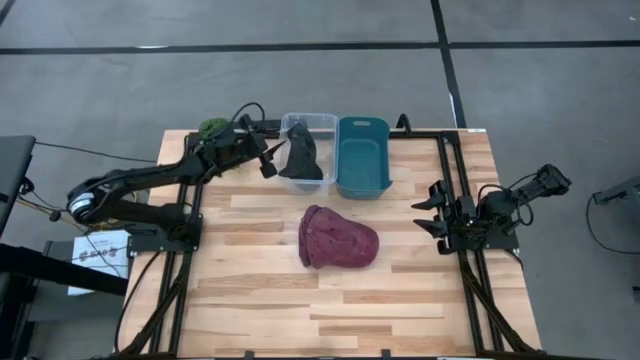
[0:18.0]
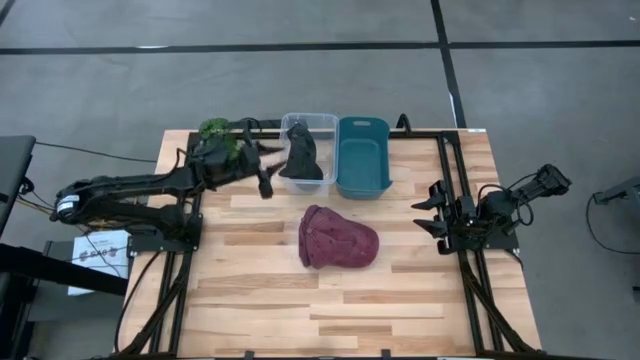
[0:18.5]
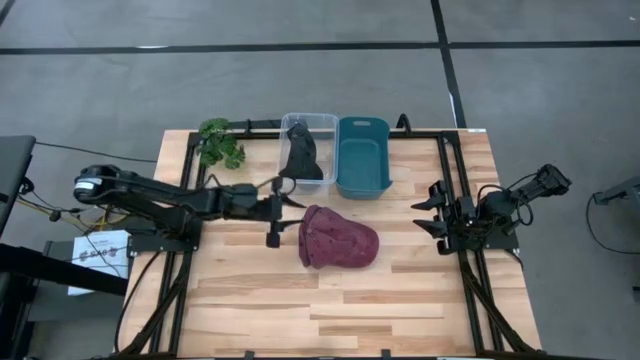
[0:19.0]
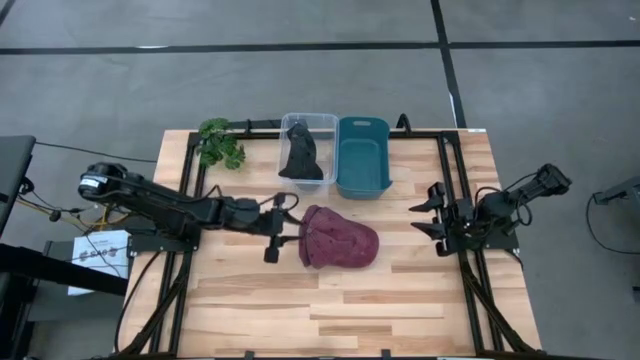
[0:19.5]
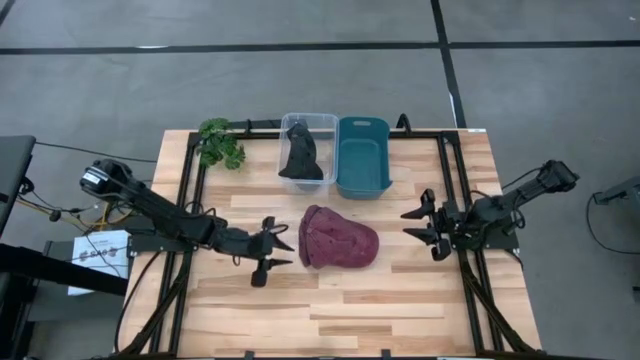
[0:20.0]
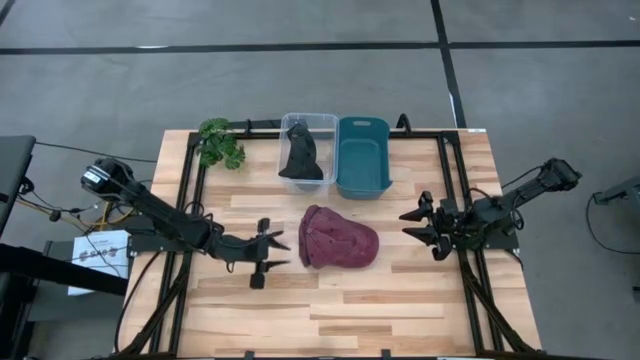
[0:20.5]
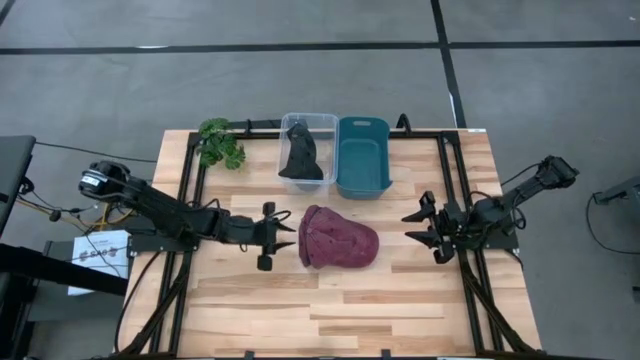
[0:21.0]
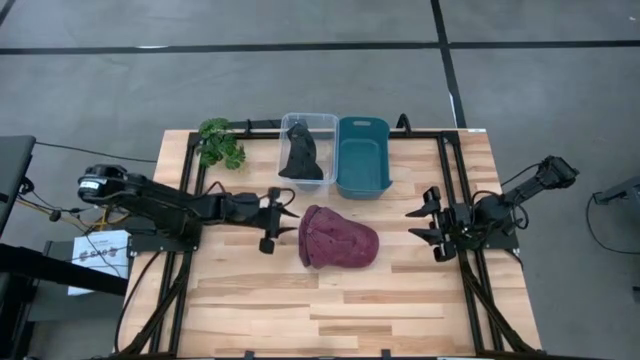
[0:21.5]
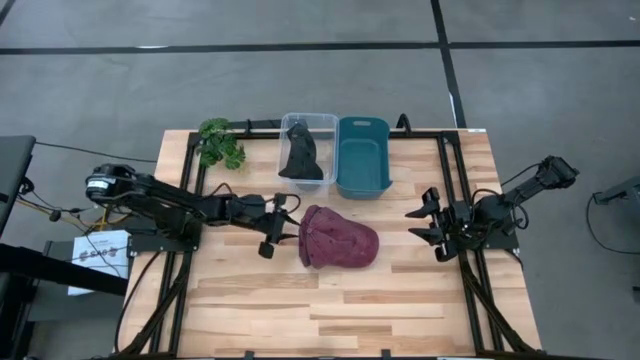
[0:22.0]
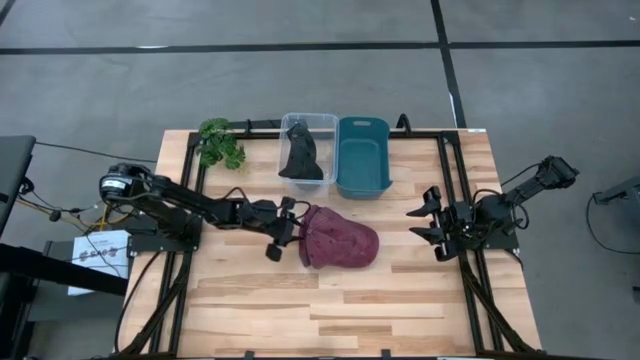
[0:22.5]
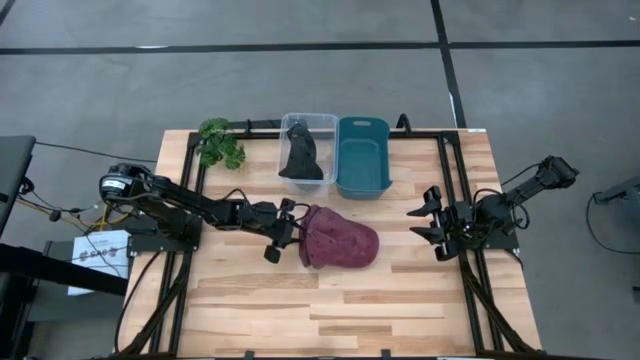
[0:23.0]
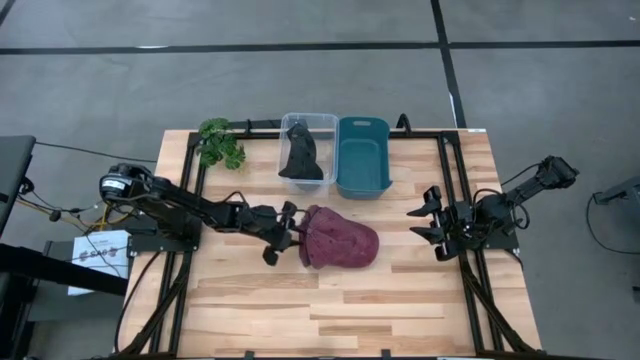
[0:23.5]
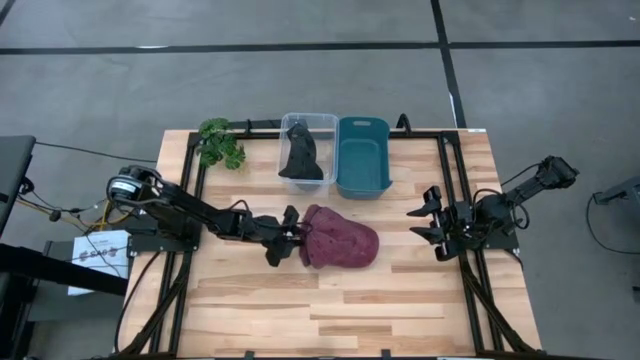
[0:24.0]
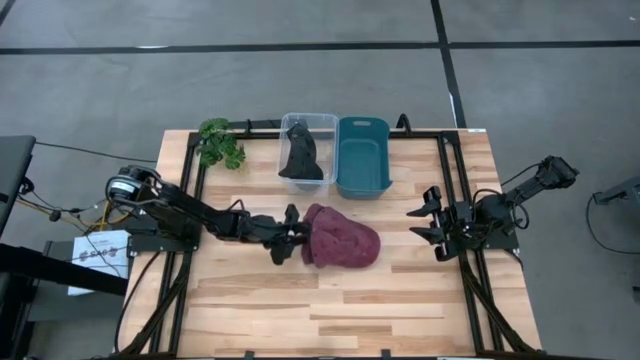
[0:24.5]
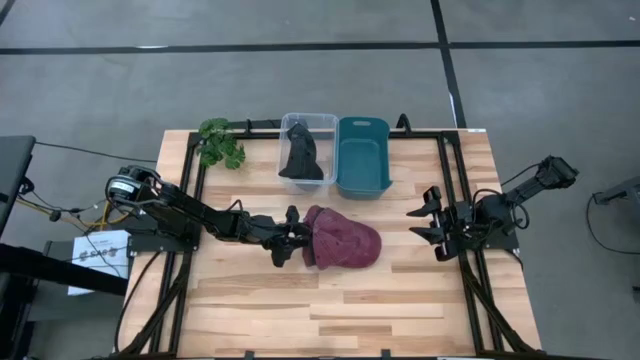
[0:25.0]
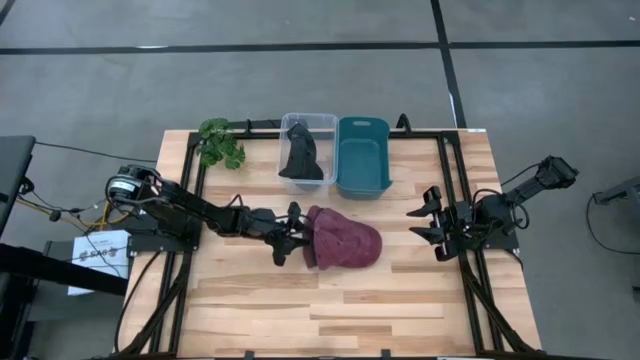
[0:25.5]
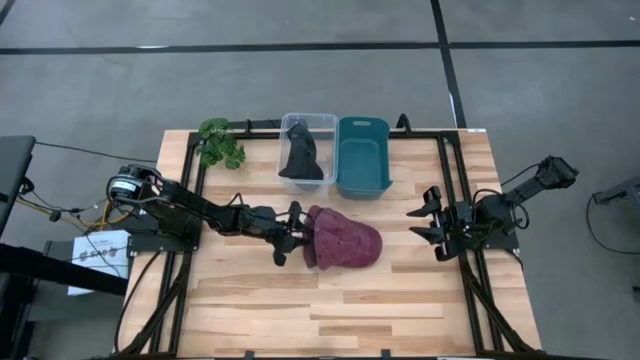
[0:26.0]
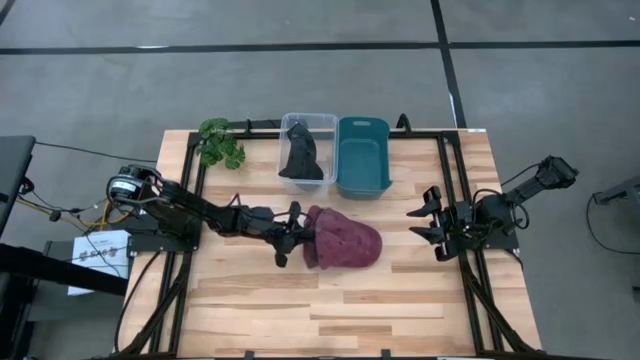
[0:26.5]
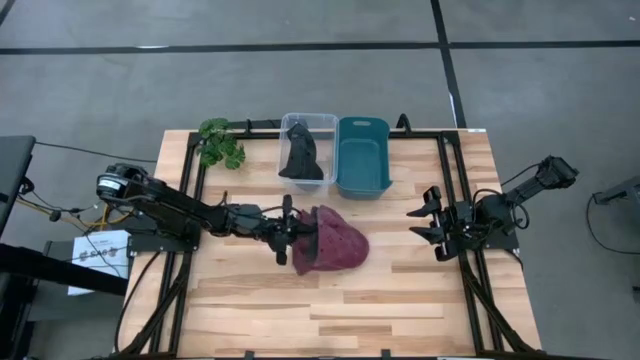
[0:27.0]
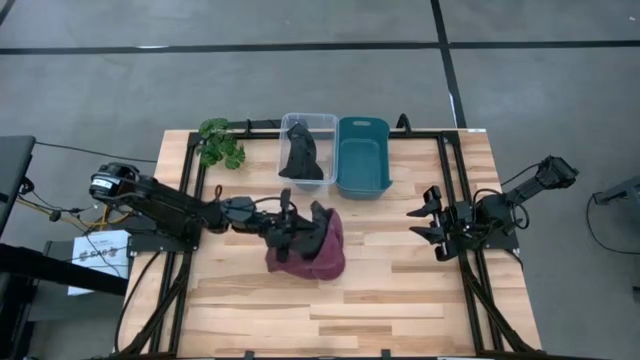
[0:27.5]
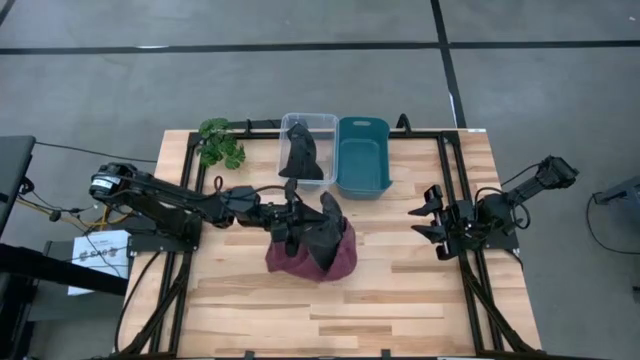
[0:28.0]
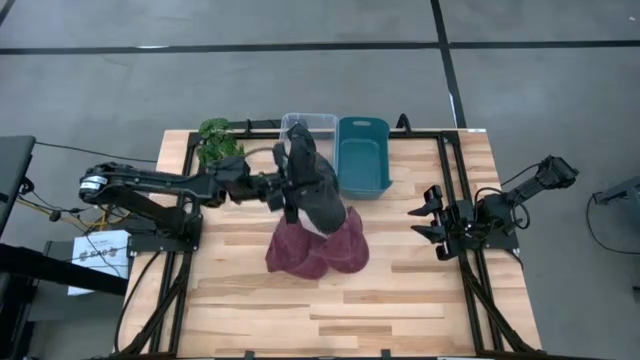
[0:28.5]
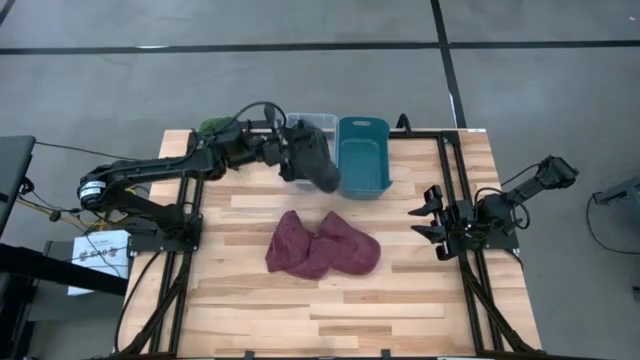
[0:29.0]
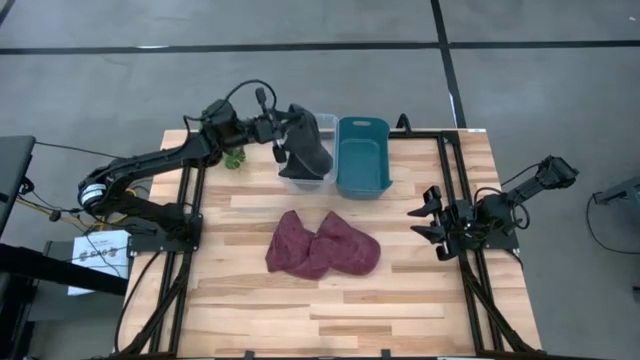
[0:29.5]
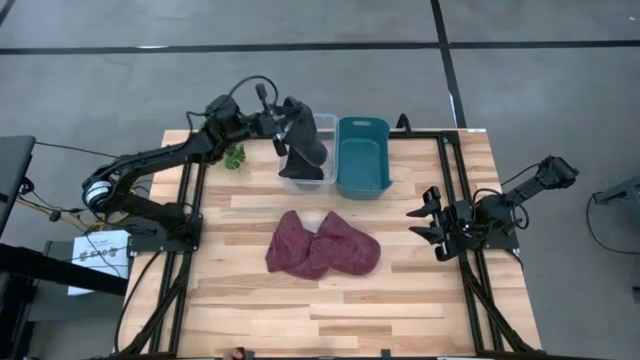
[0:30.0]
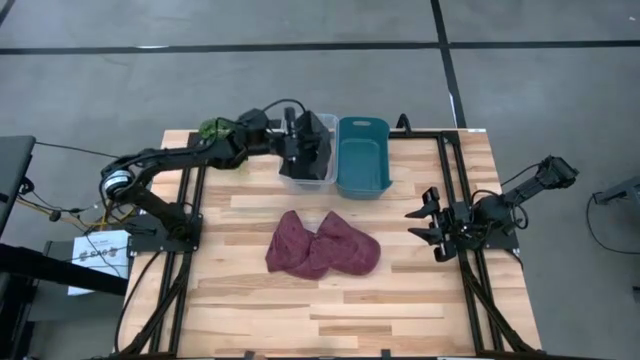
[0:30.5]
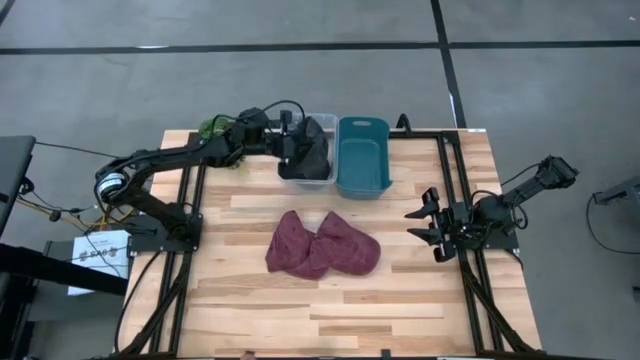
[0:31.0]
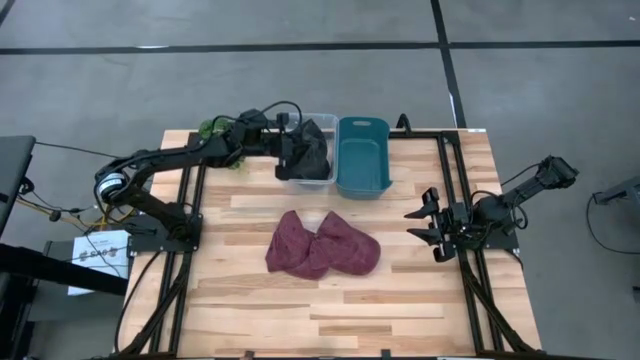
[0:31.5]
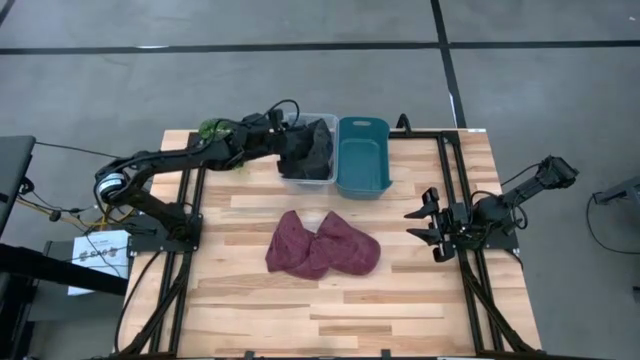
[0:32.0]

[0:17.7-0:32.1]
Task: Pick & Place hat
Put the black cap into the transparent bin

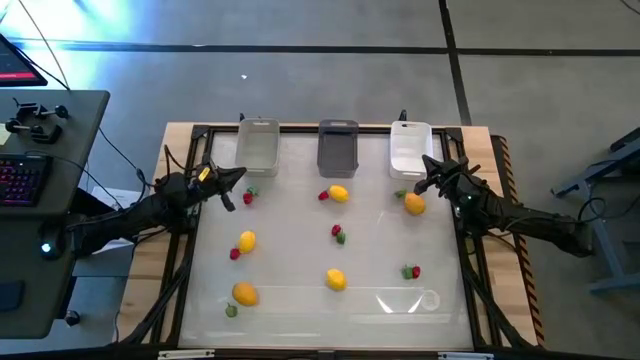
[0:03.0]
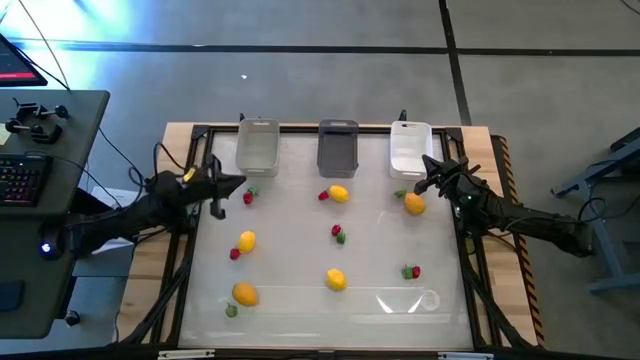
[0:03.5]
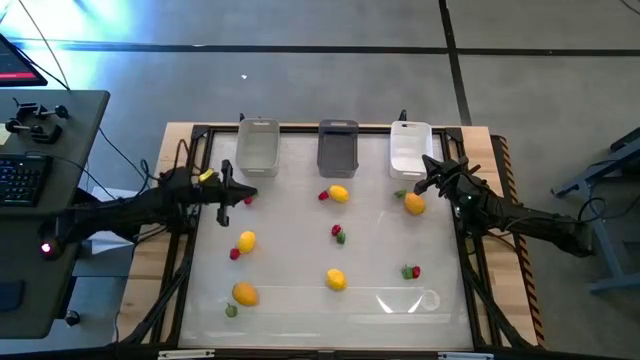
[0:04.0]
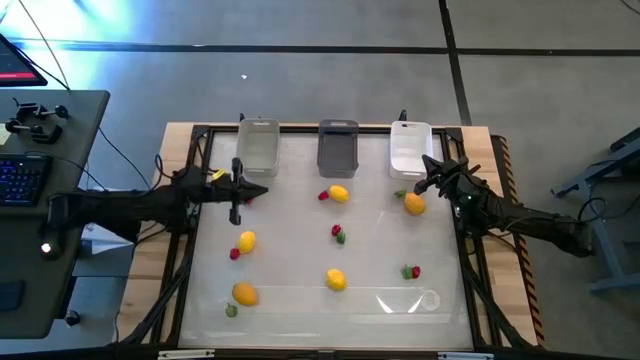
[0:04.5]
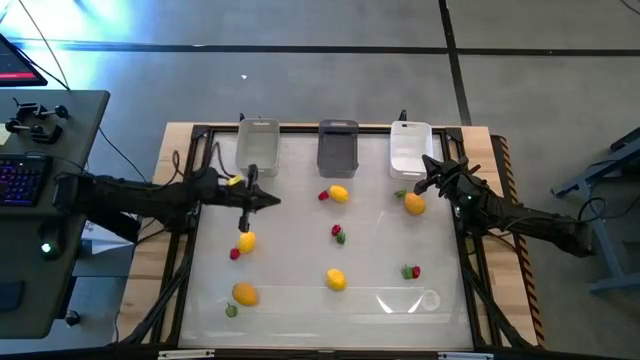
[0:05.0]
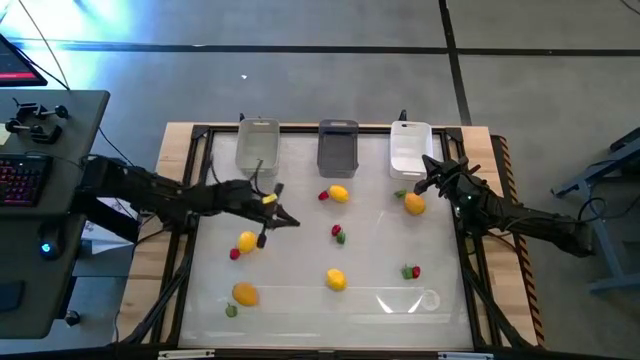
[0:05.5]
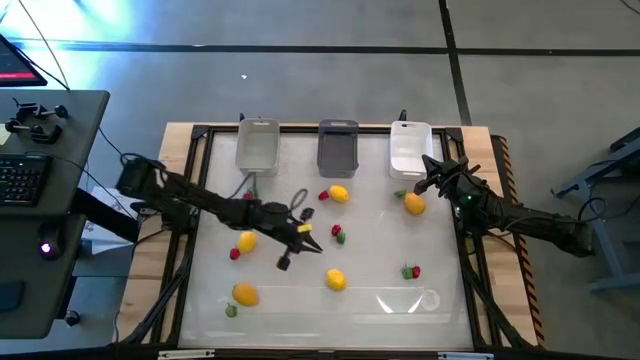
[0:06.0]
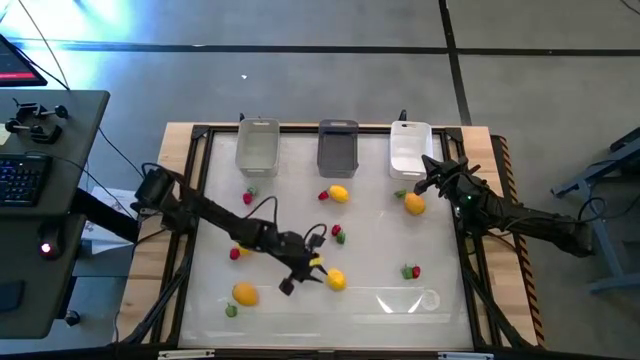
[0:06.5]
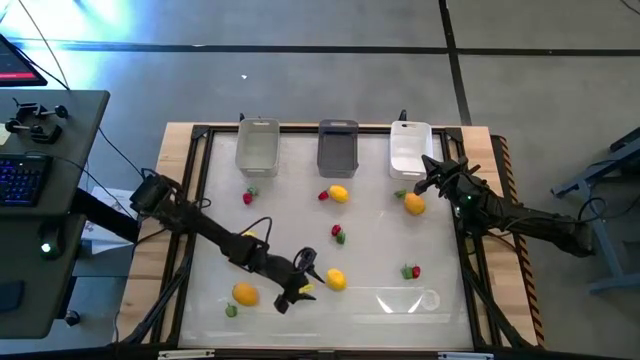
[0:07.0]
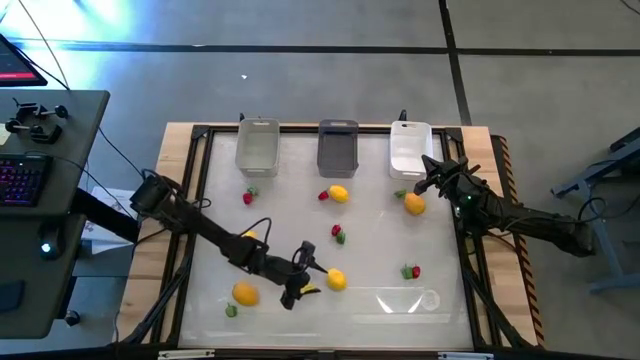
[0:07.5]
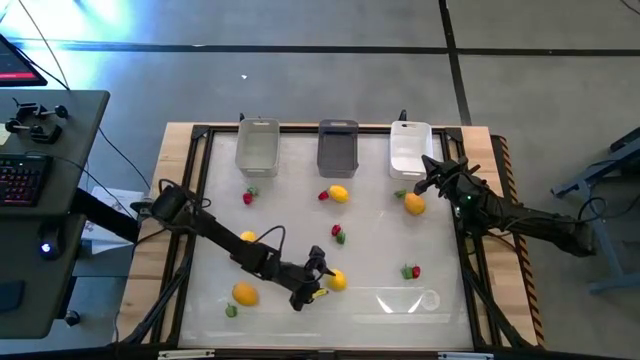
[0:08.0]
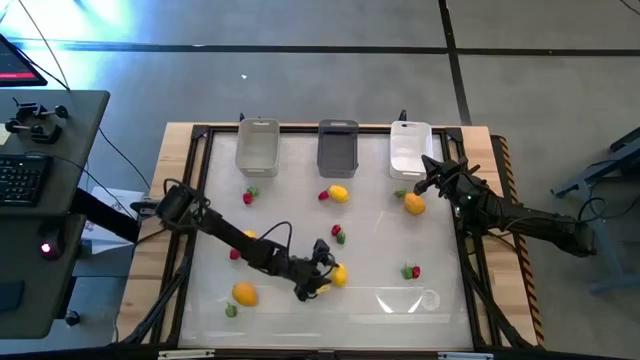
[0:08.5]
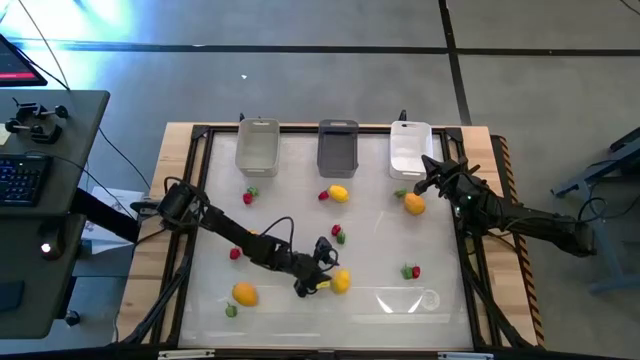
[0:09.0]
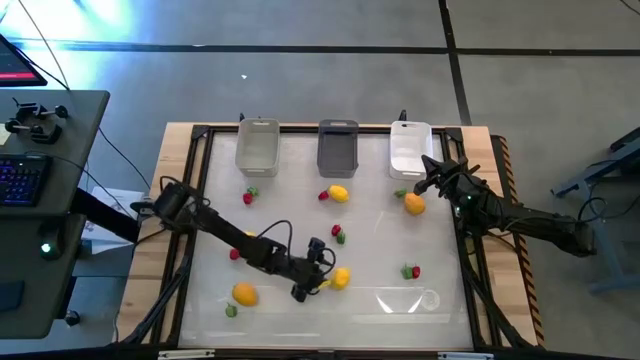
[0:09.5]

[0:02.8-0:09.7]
Task: Sort produce into baskets
Put the lemon into the black bin
